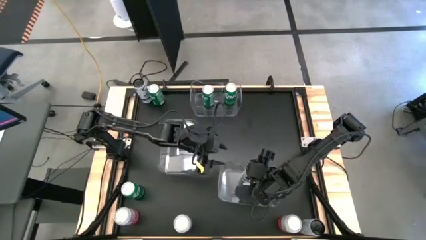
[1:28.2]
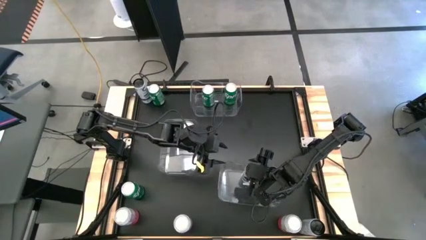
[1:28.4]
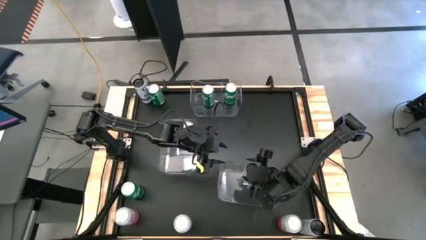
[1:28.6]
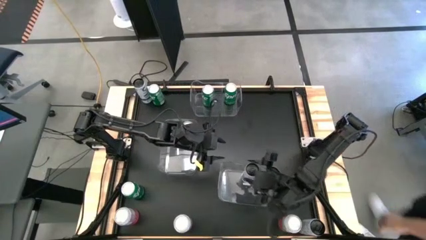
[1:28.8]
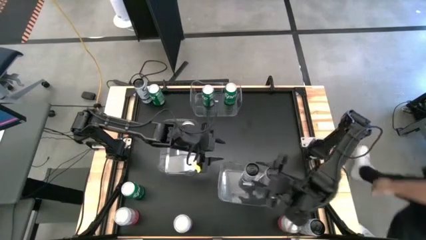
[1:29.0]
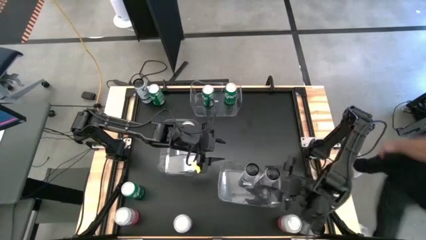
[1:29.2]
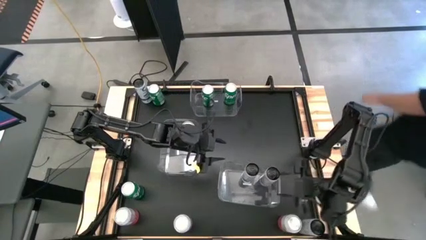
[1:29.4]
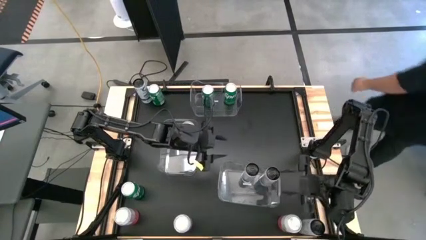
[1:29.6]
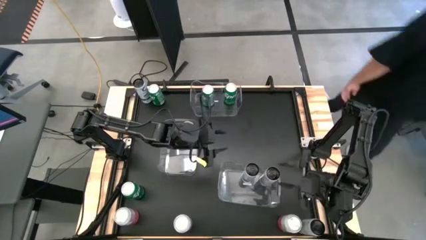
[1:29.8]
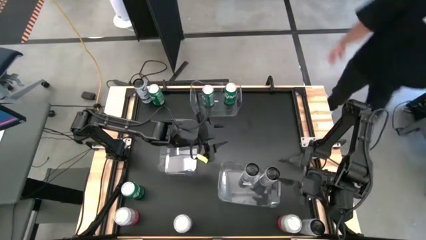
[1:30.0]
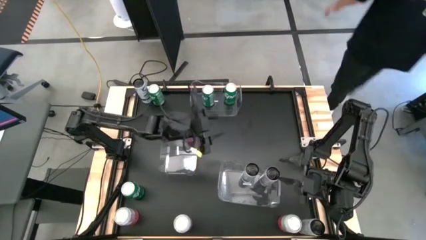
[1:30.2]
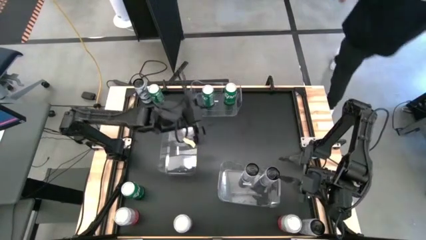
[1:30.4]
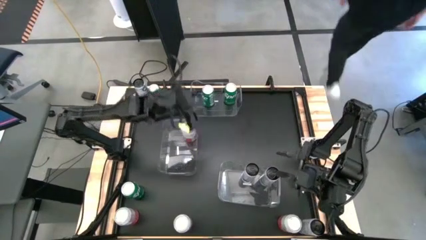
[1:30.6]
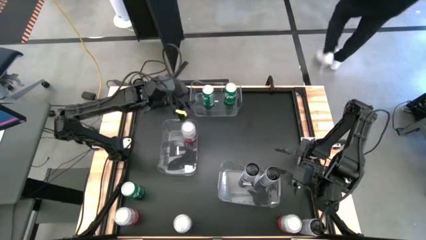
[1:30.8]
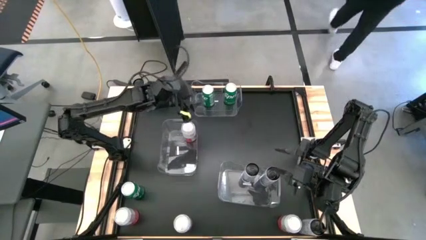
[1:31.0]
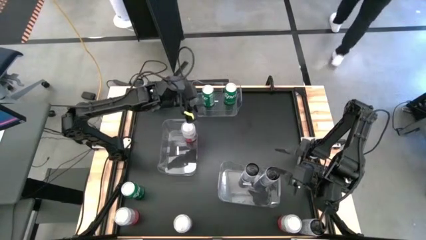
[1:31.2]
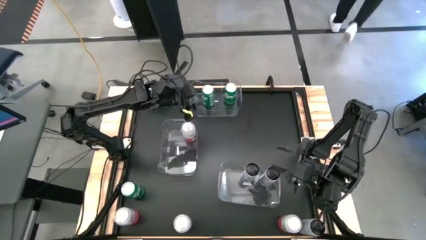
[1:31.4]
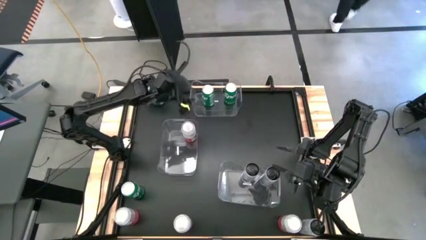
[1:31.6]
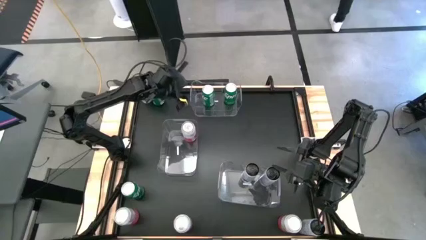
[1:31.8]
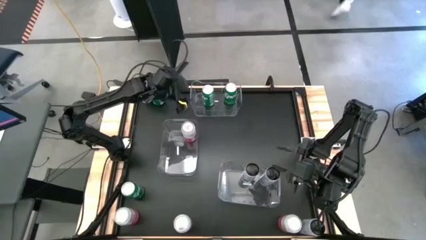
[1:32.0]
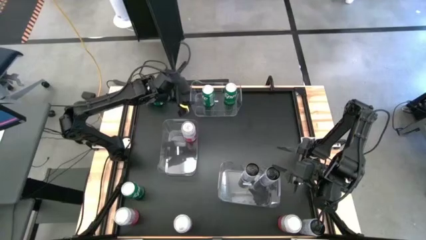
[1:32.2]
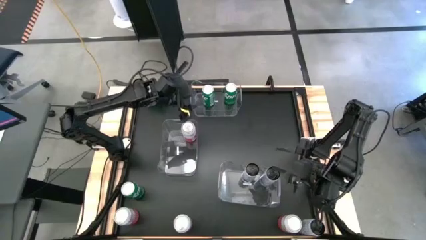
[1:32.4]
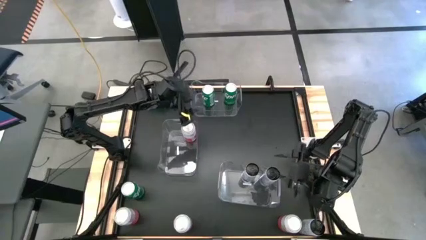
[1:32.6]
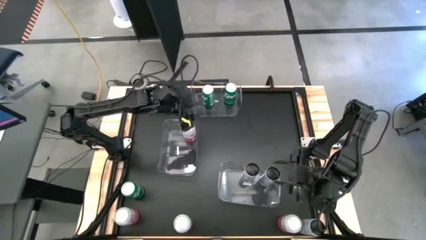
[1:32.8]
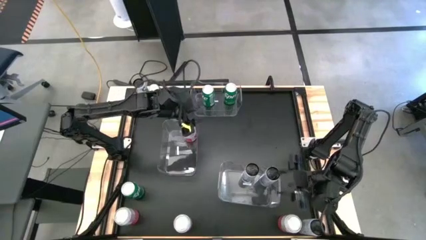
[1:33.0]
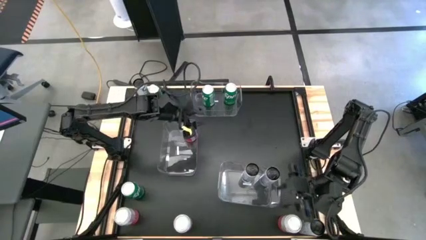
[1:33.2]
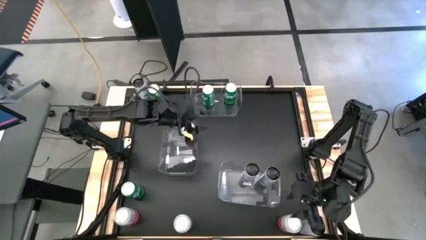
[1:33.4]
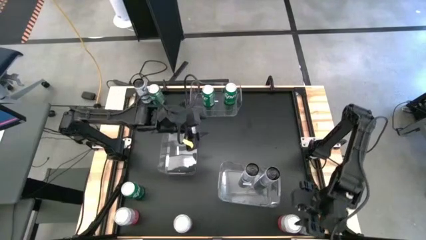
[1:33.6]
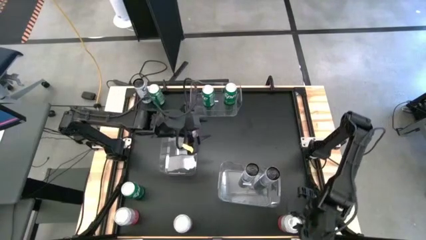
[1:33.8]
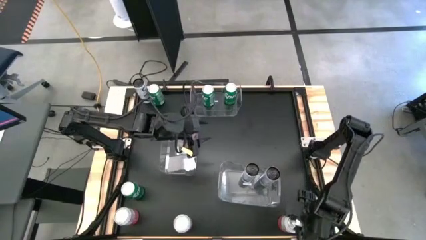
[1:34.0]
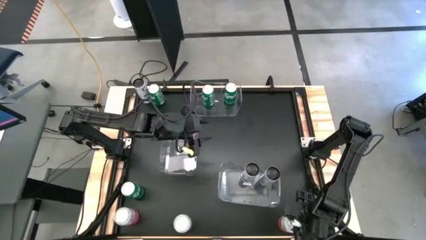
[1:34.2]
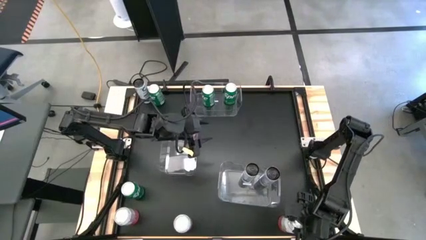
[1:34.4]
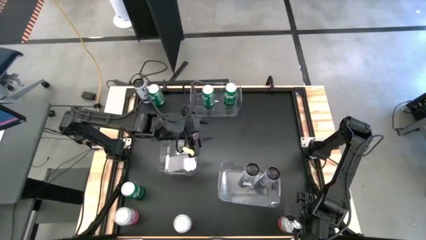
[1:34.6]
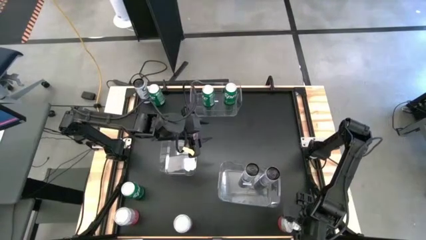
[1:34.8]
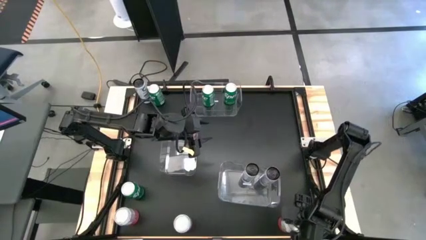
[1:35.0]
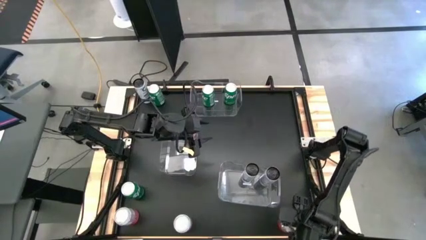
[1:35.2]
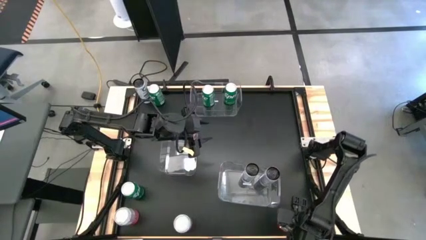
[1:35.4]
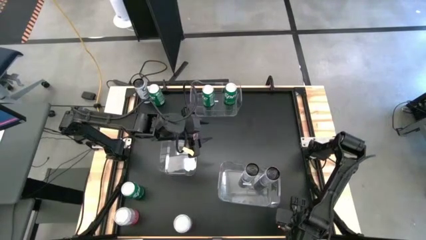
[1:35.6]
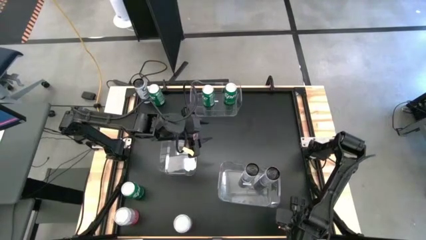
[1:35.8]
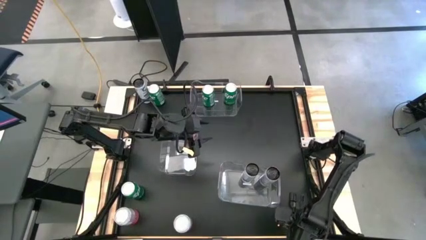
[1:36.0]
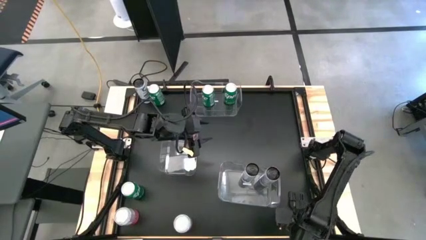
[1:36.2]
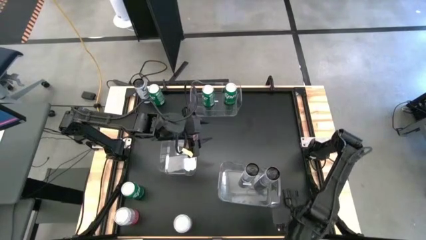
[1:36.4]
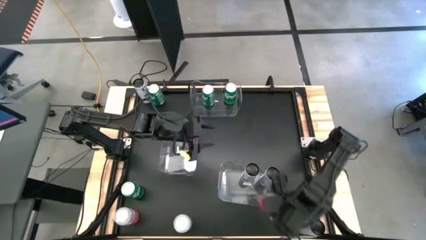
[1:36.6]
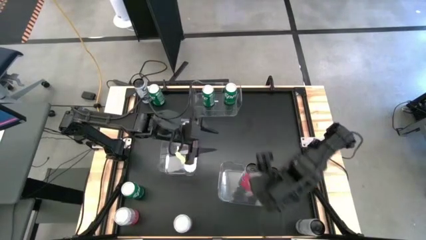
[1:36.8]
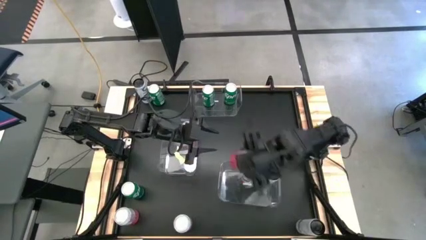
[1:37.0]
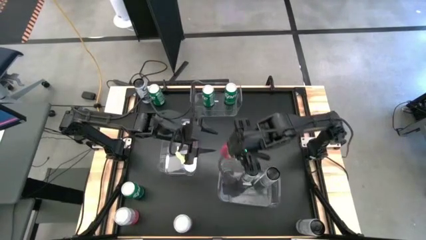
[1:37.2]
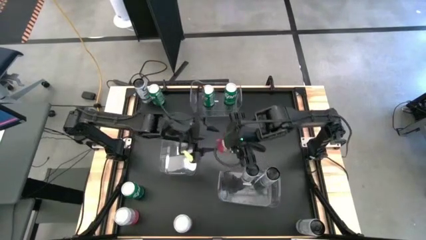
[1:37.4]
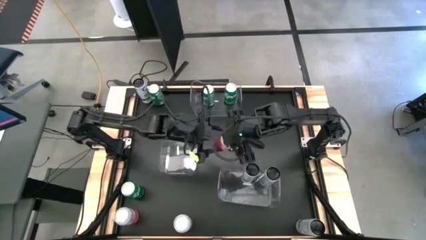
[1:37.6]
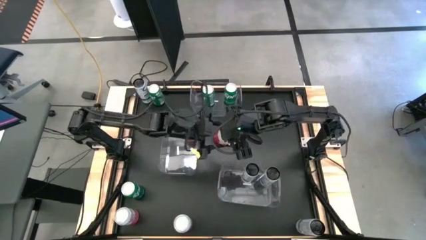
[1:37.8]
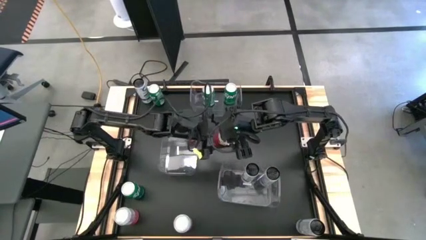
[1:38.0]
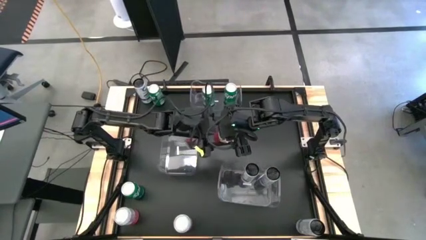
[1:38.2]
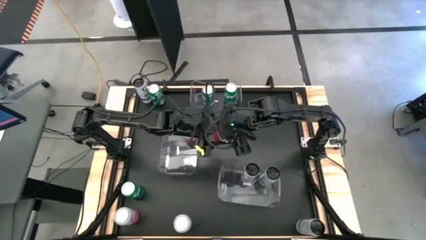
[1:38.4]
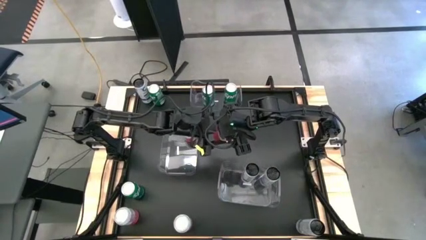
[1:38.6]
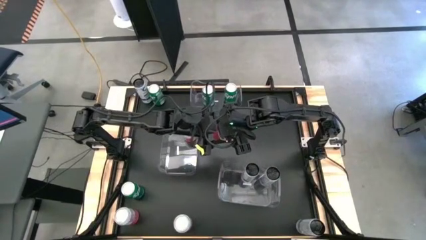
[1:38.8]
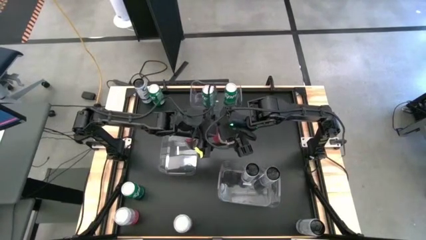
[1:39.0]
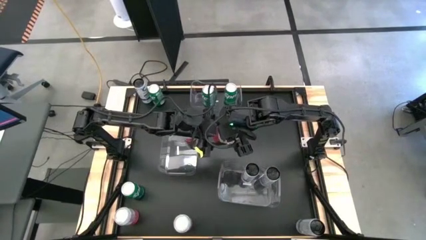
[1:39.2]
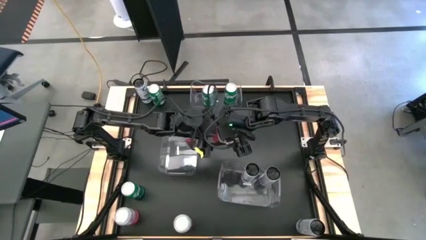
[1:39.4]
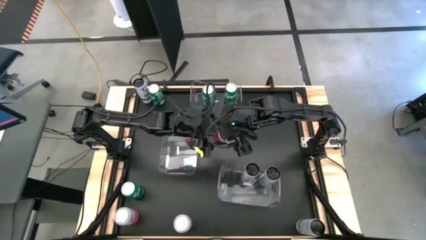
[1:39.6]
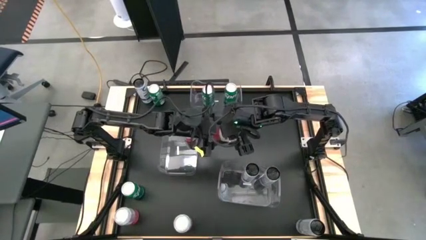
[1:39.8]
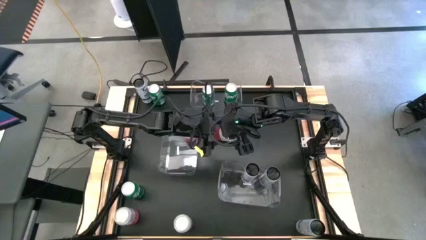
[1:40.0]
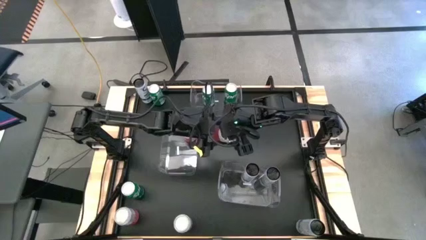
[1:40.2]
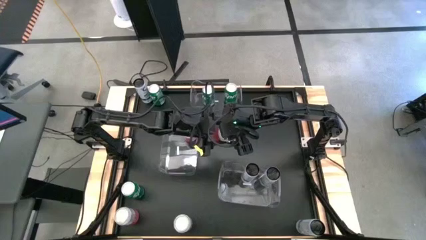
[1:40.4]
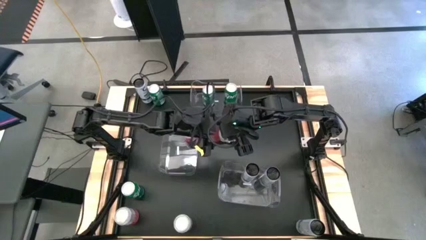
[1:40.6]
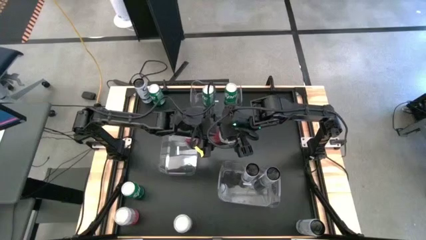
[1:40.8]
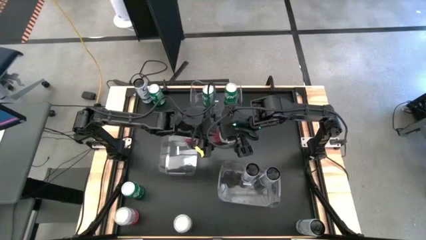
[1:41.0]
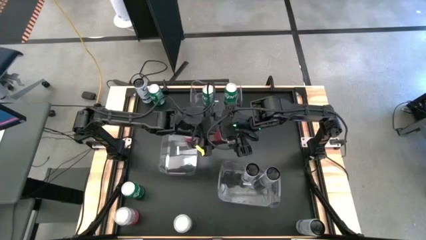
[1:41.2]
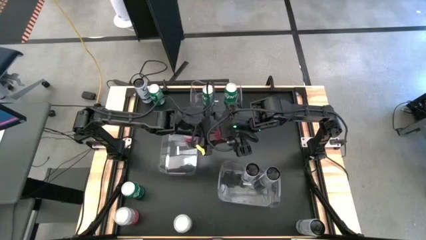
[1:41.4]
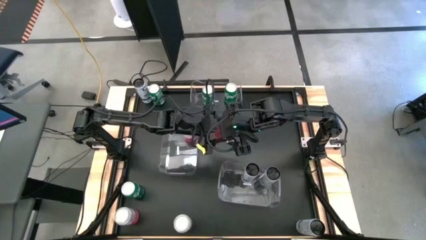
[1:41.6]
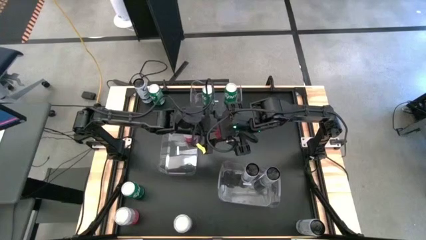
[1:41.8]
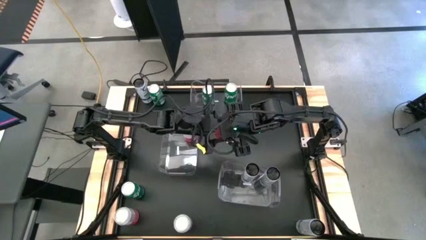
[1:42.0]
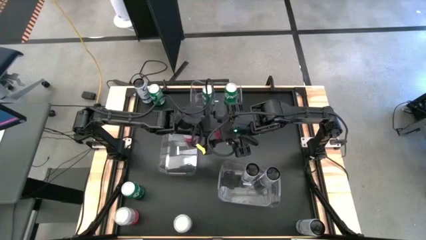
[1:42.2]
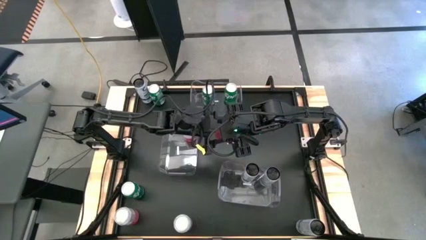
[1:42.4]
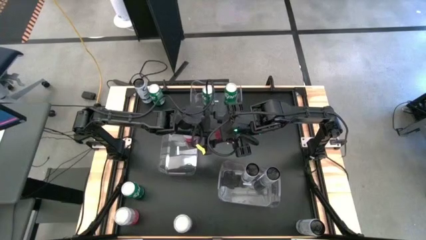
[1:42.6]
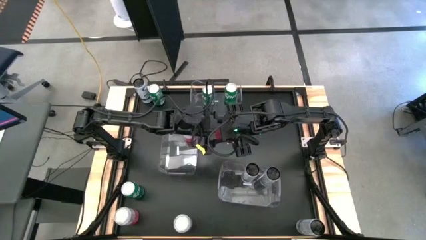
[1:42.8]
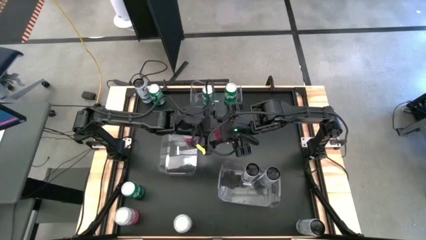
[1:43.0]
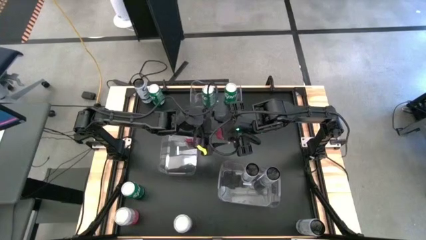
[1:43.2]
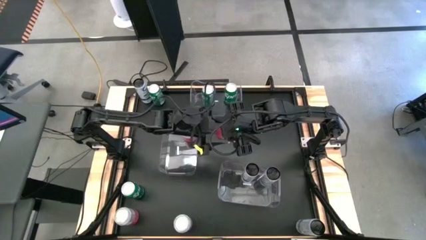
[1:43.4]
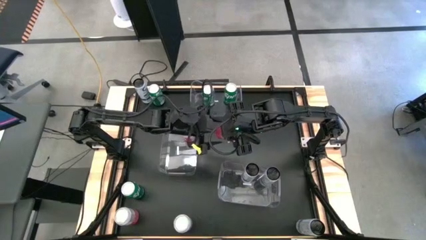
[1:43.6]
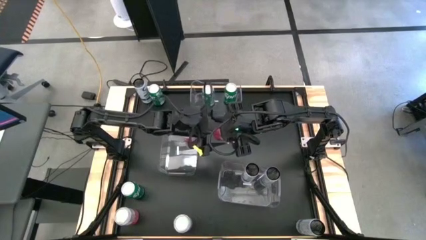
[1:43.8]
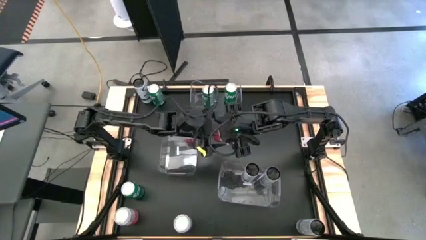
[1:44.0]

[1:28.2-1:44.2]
Task: Sort soda cans
Put the pink soda can into the middle transparent bin
